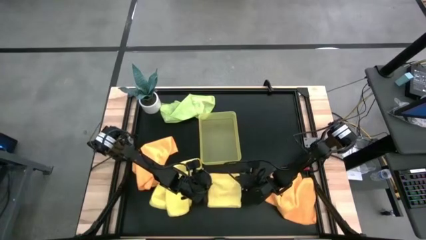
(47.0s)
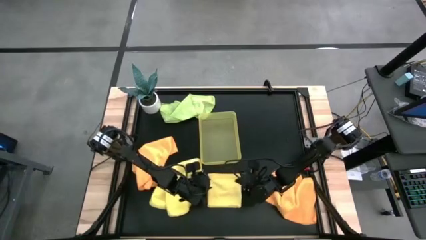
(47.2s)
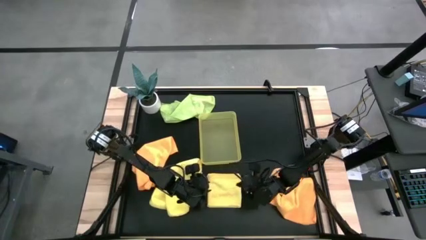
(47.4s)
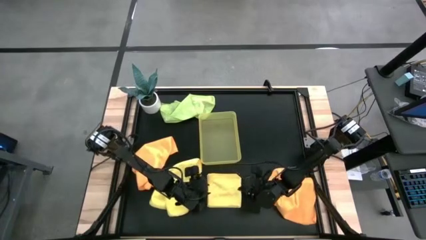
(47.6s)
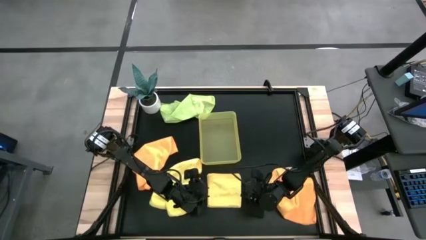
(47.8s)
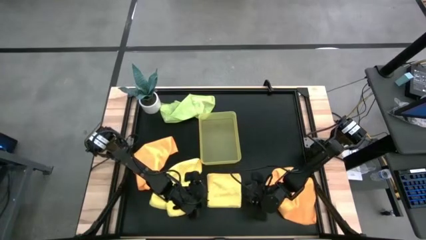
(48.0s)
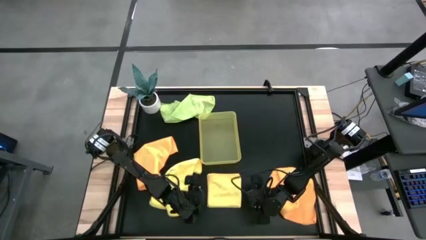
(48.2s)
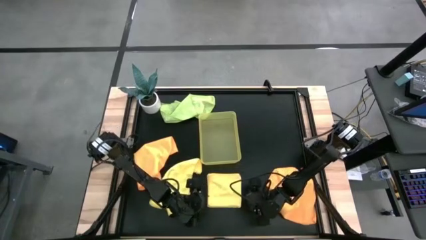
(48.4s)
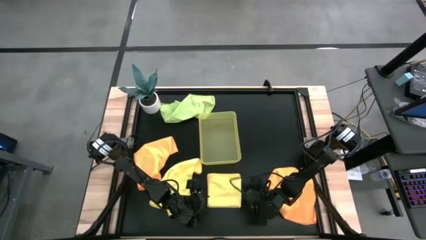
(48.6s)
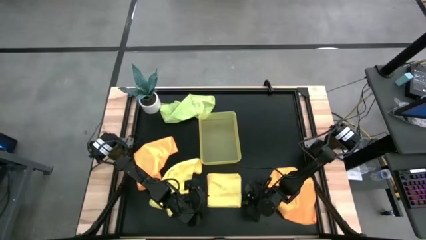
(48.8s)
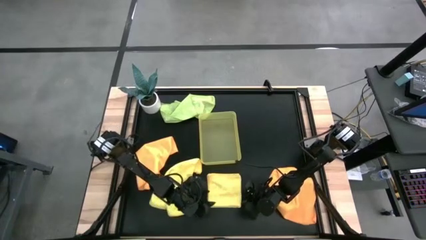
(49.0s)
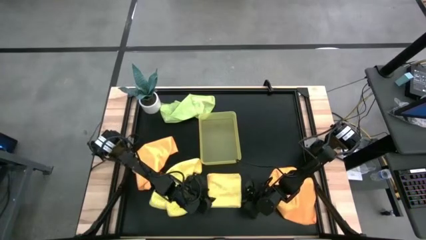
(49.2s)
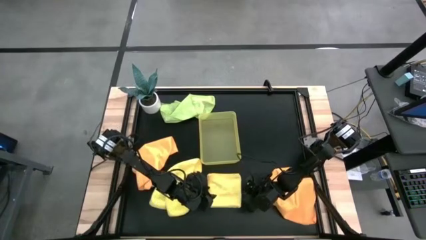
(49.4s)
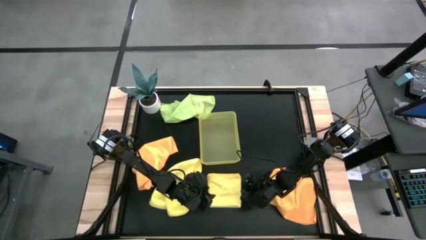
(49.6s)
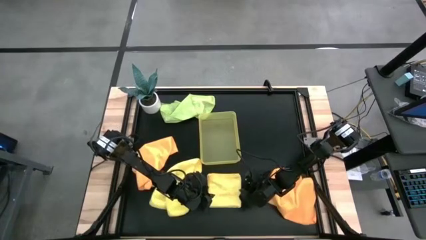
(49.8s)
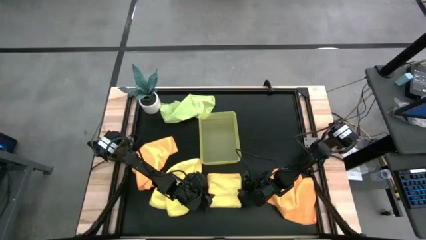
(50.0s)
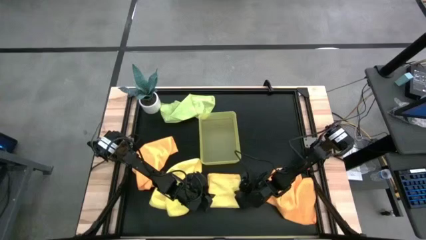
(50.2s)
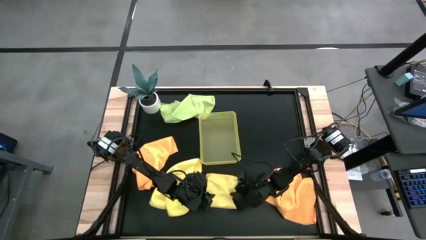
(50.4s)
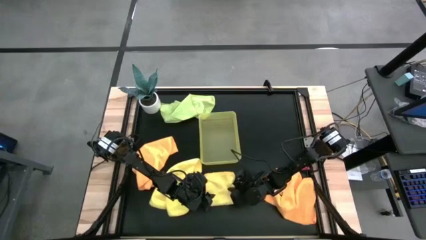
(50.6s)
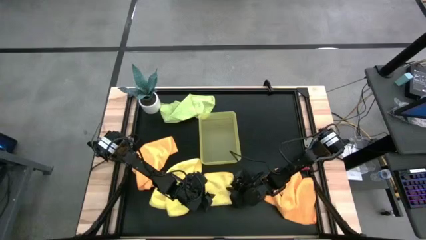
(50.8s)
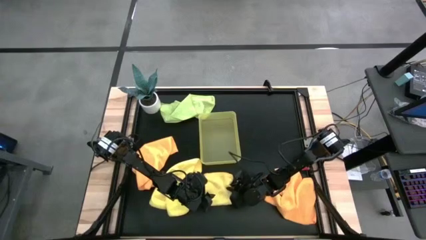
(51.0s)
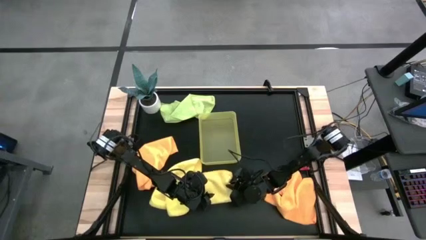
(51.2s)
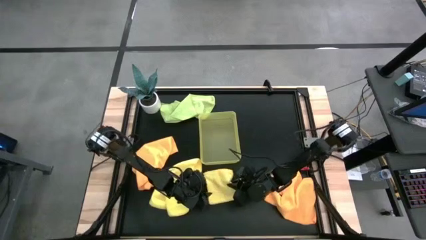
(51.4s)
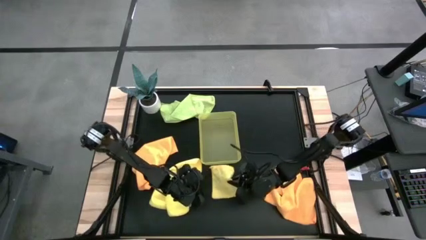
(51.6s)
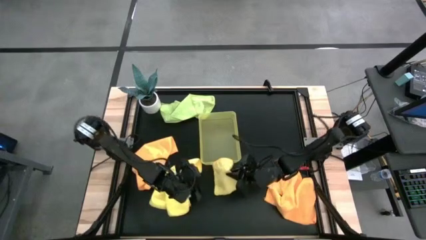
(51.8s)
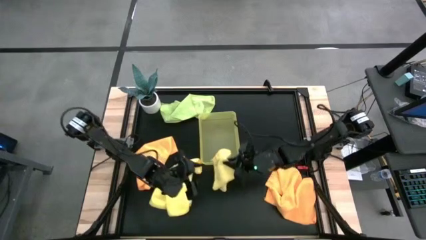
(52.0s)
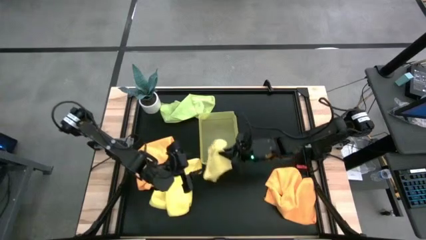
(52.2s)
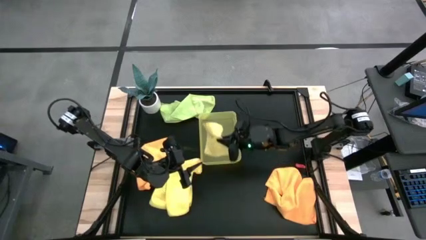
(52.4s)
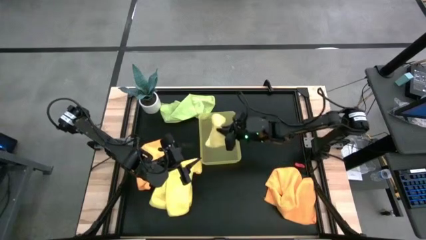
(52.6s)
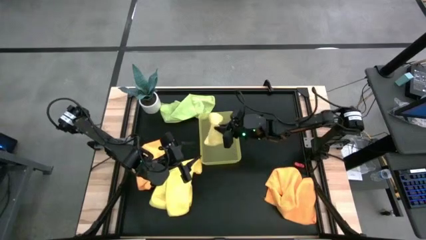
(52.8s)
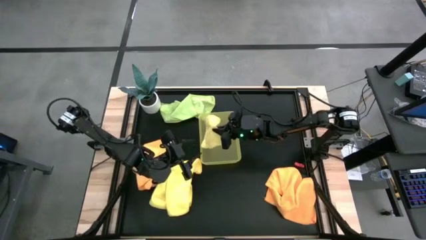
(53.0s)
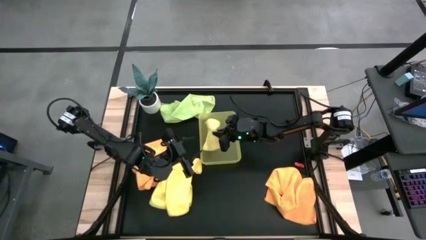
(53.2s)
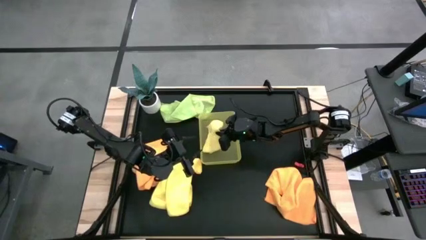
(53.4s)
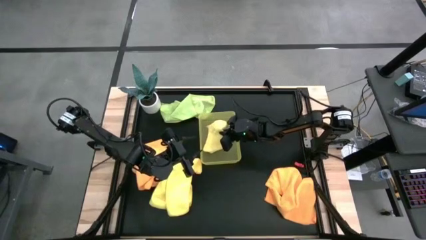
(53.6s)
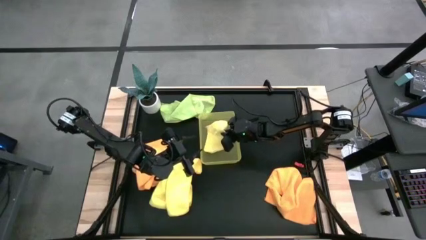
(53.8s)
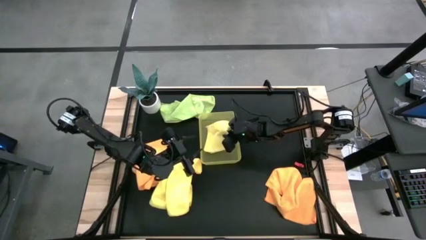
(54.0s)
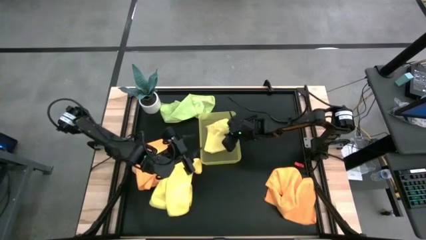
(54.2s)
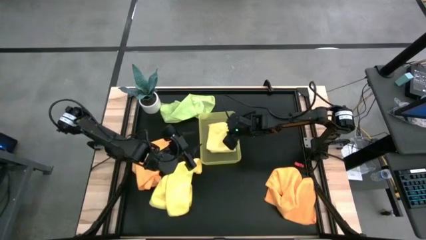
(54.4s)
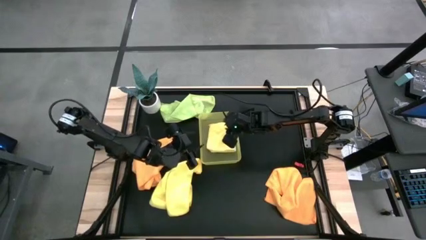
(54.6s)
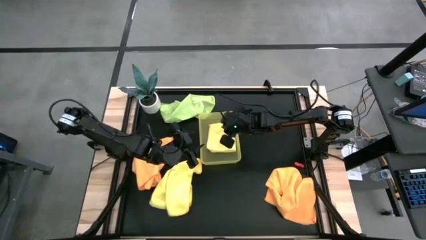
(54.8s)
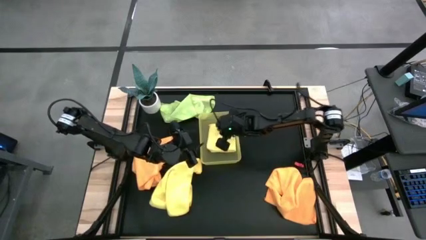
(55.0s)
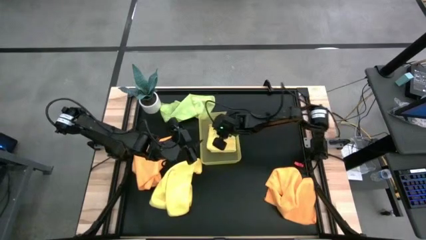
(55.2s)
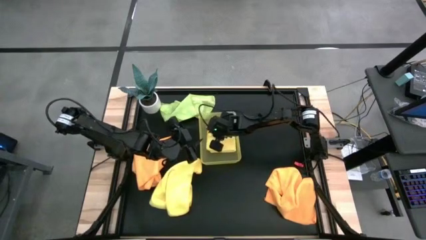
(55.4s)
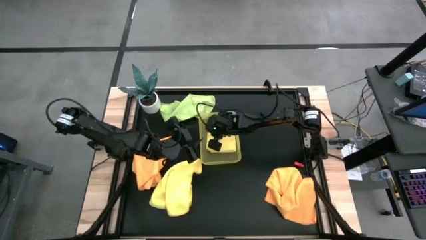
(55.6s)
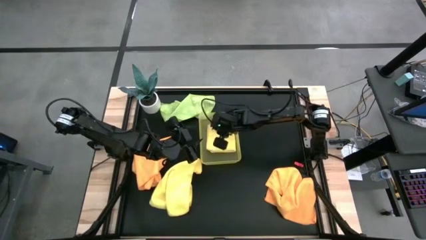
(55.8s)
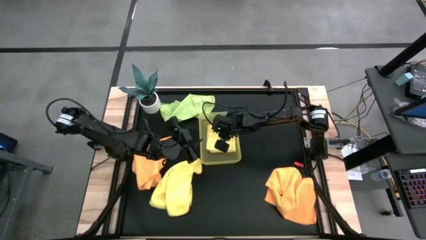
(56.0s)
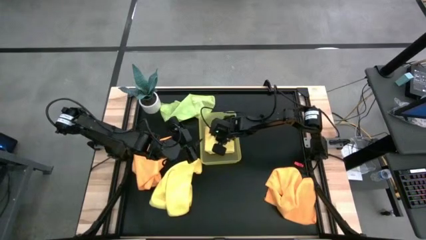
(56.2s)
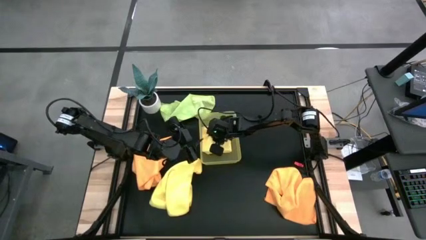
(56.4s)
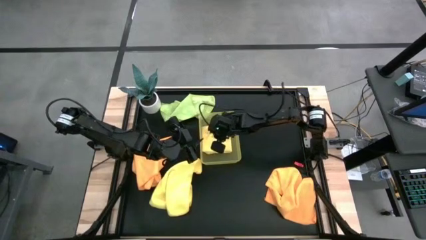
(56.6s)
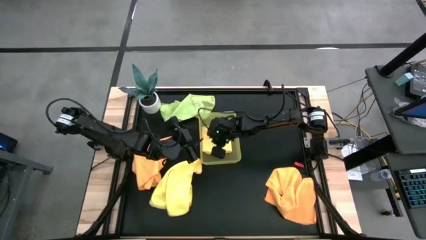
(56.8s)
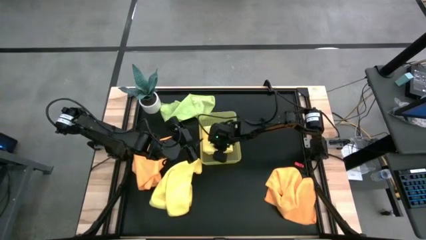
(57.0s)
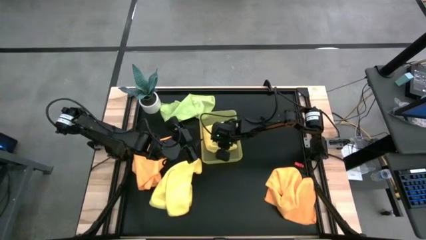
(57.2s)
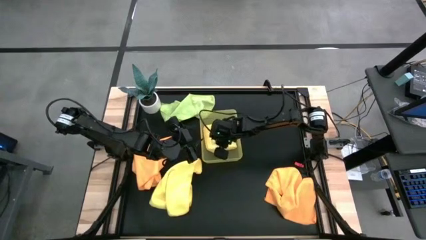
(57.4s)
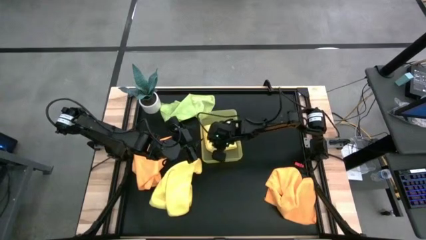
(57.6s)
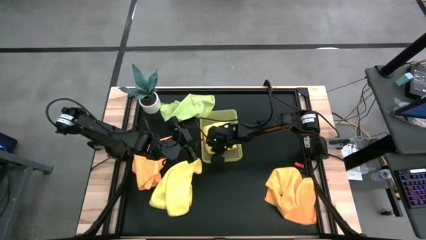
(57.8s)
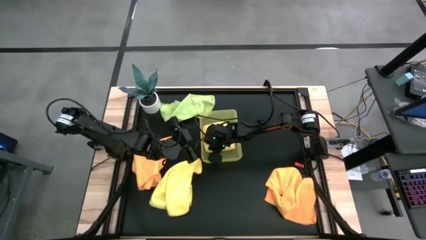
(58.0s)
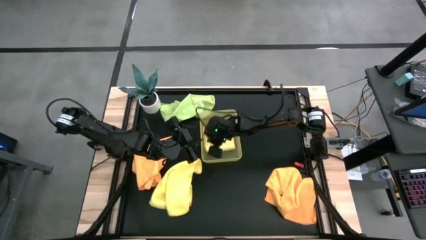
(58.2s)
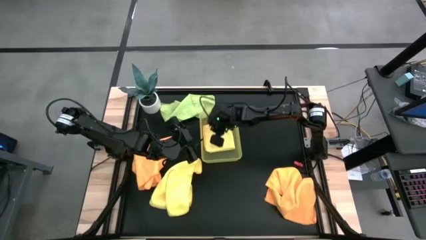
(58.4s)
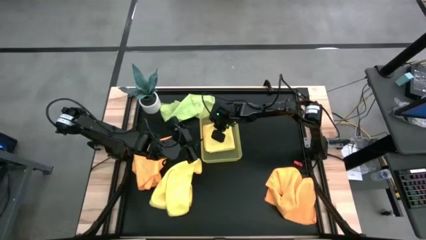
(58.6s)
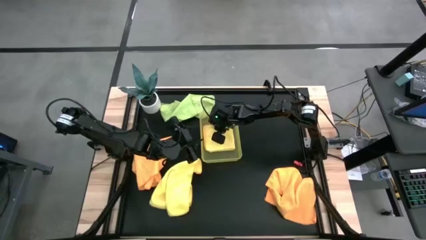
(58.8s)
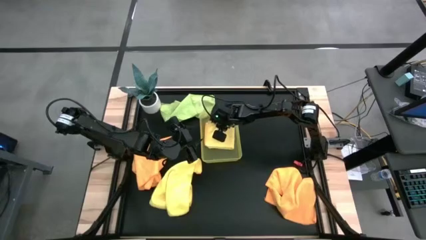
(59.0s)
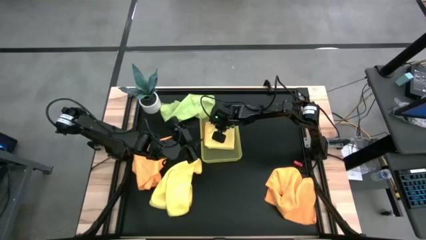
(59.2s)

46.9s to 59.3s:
Task: Fold microfiber towels
Put the folded top yellow microfiber cloth into the bin

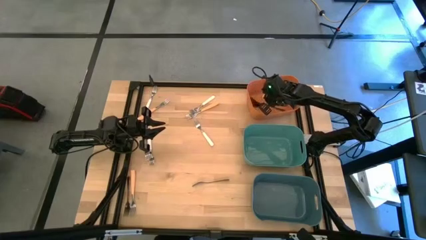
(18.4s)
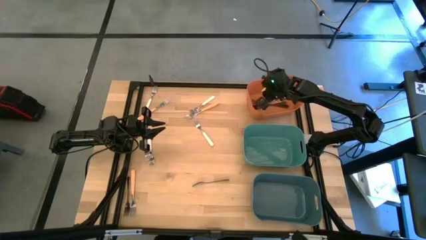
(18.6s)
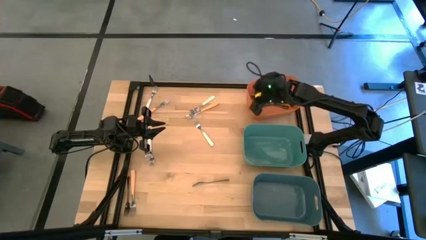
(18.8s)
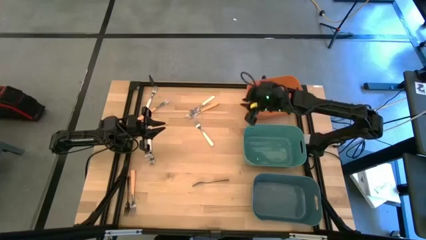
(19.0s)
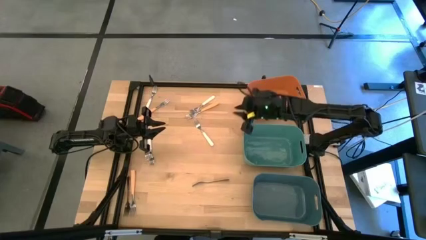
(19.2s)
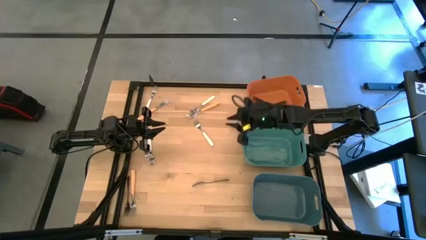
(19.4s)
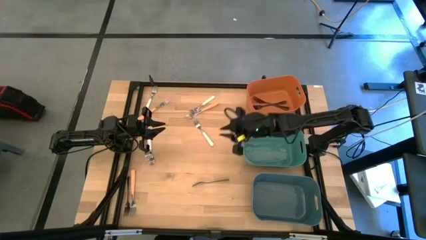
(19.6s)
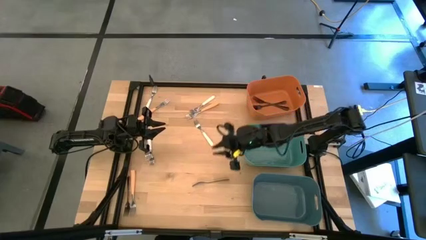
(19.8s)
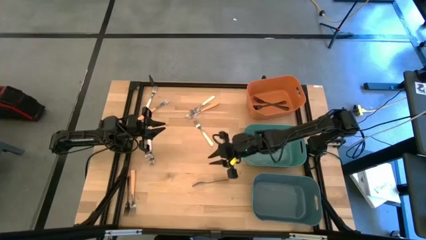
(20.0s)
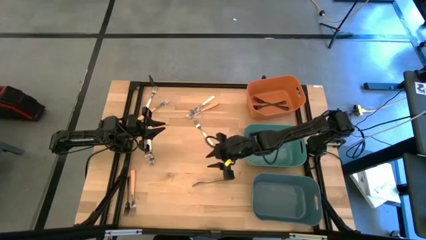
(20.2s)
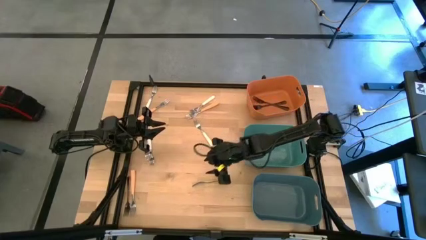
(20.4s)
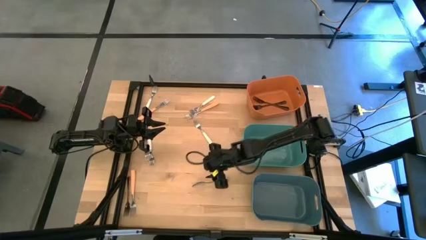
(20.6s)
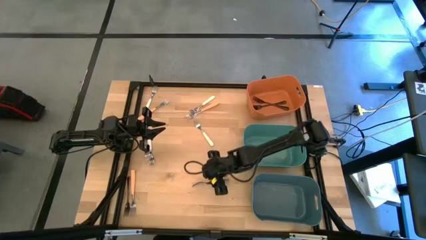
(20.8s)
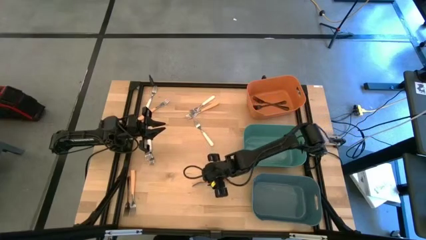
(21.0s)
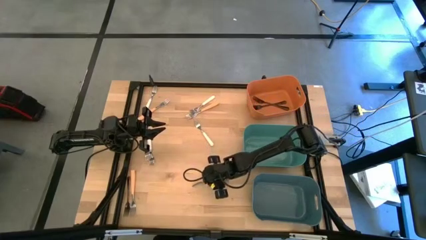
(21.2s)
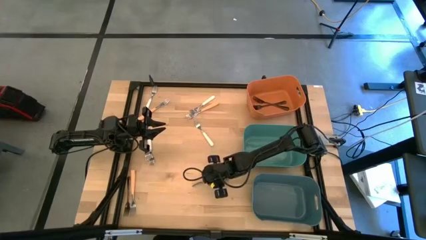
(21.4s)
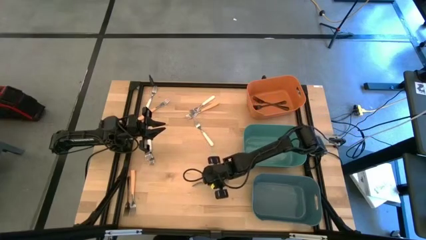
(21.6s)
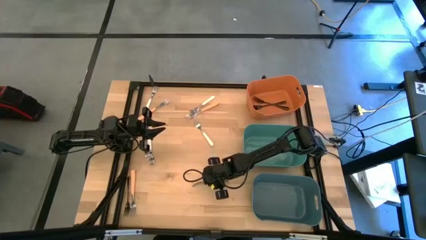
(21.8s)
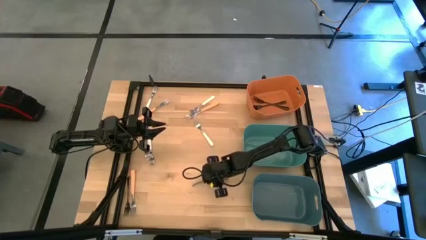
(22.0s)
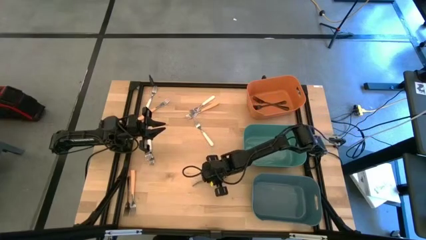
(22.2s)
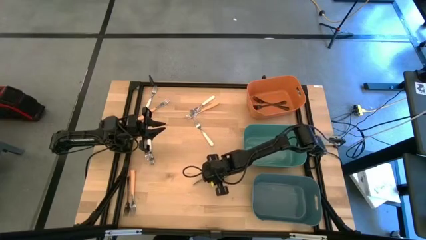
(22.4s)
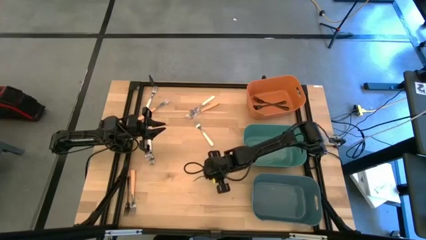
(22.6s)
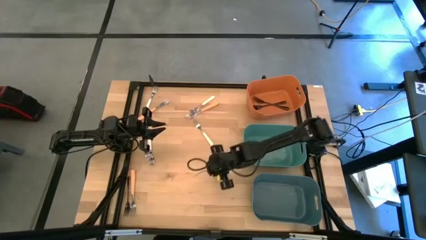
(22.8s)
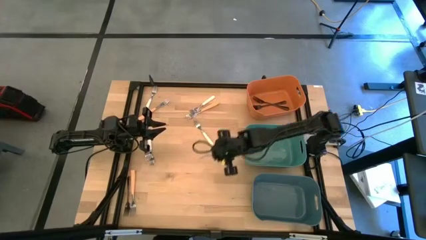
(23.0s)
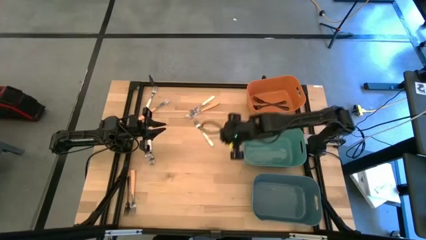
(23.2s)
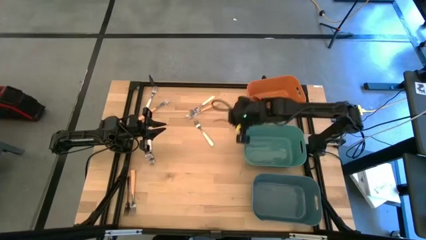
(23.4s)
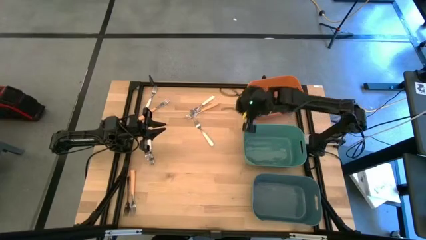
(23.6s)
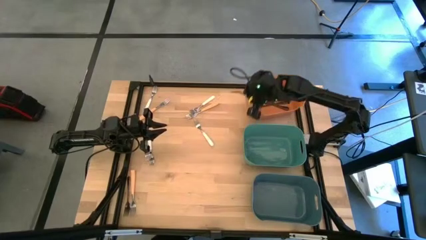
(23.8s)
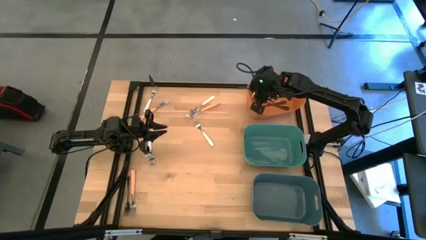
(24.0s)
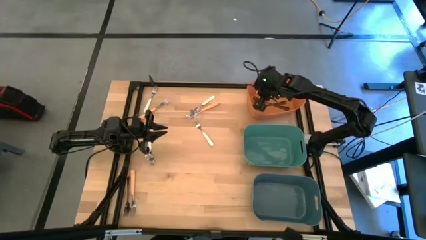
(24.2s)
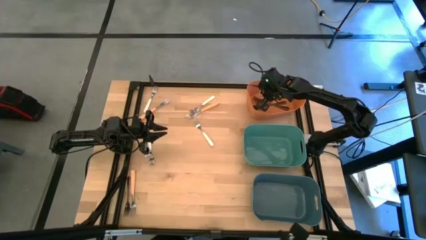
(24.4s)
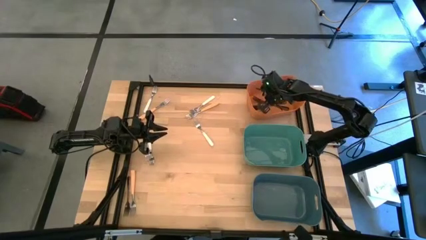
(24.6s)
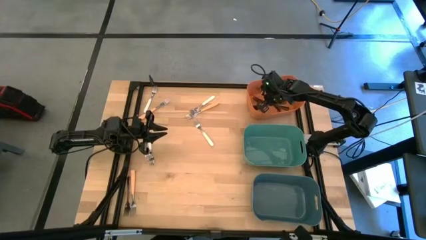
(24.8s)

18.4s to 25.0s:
Task: Sort silverware by color (type)
Put the black fork into the orange bin
